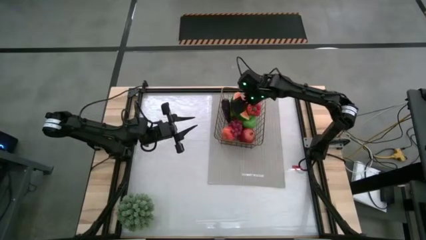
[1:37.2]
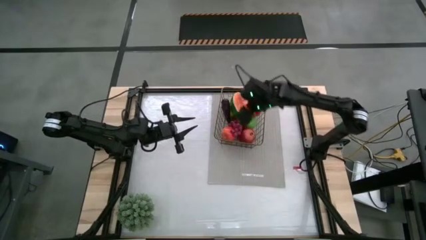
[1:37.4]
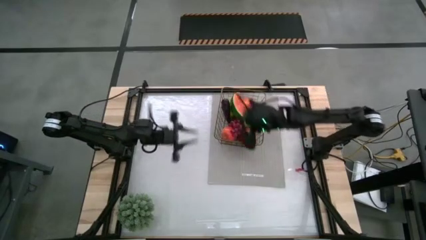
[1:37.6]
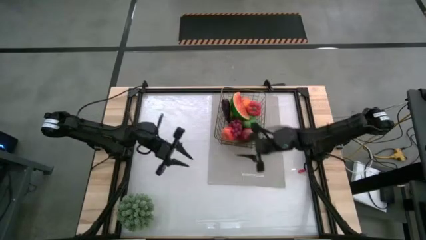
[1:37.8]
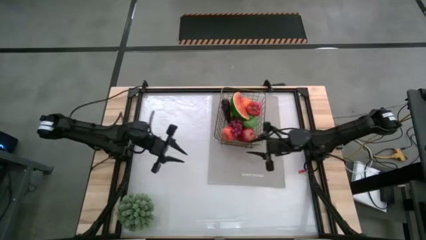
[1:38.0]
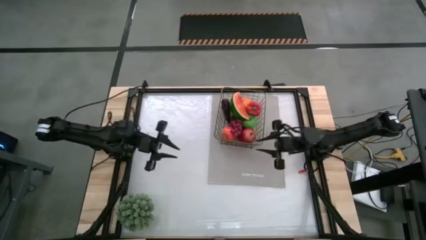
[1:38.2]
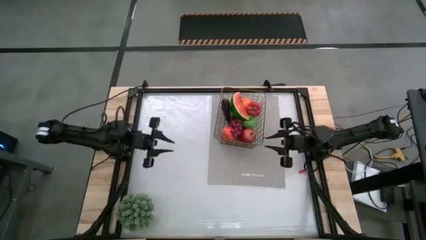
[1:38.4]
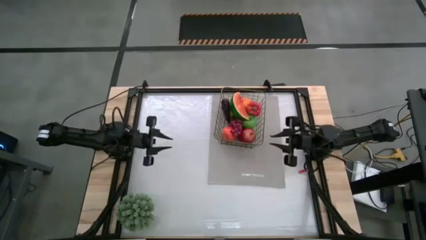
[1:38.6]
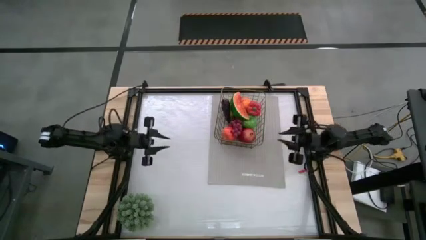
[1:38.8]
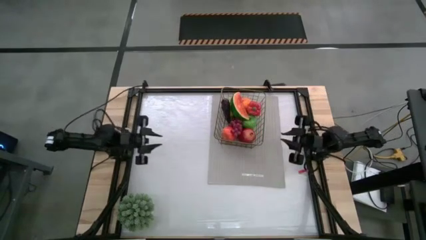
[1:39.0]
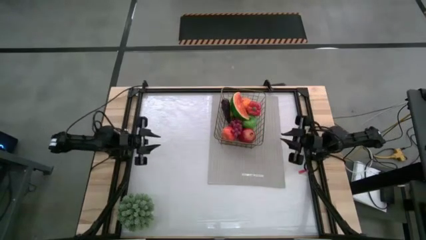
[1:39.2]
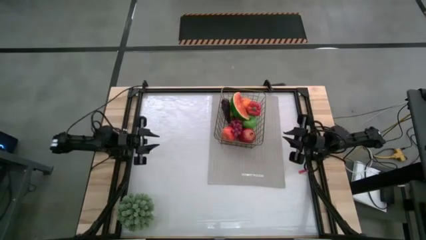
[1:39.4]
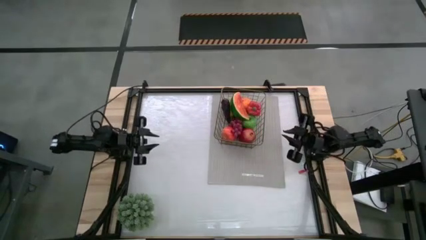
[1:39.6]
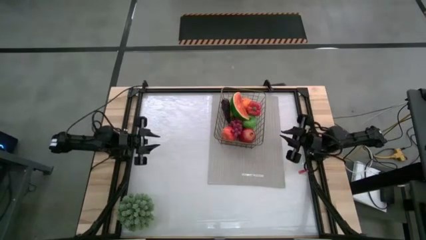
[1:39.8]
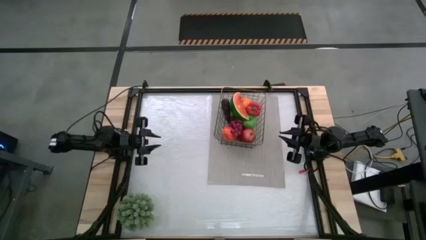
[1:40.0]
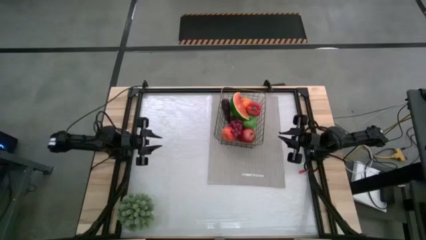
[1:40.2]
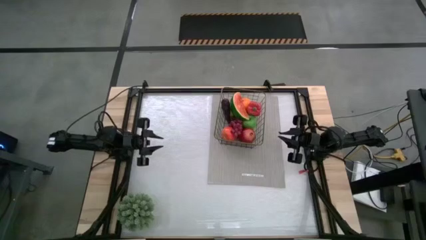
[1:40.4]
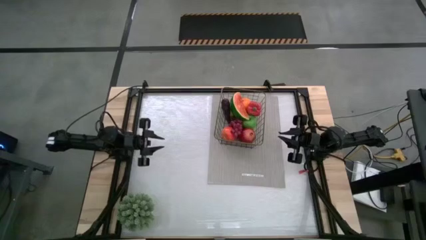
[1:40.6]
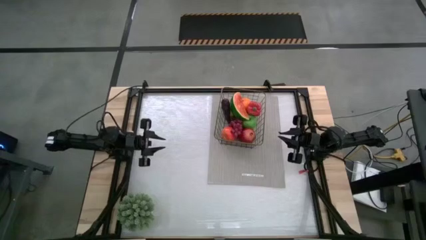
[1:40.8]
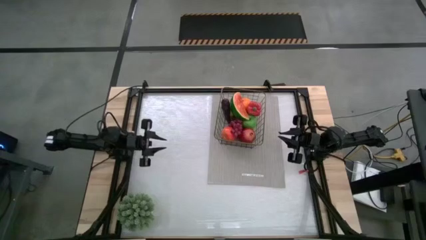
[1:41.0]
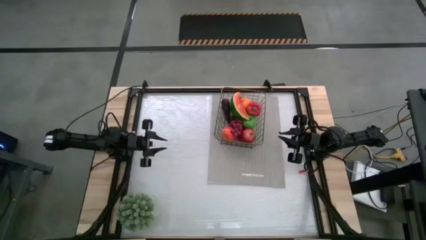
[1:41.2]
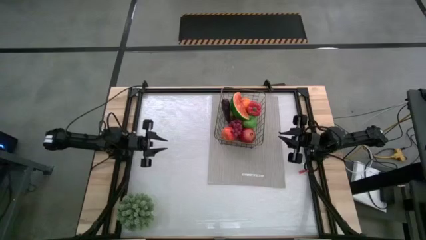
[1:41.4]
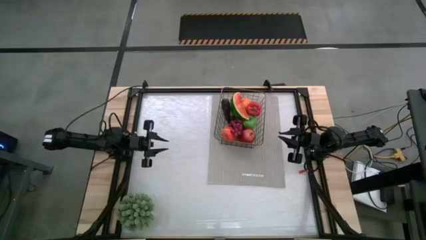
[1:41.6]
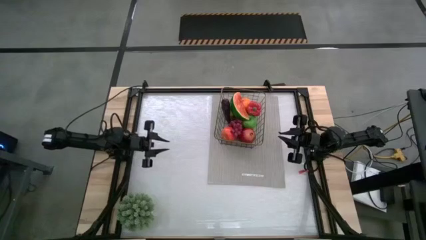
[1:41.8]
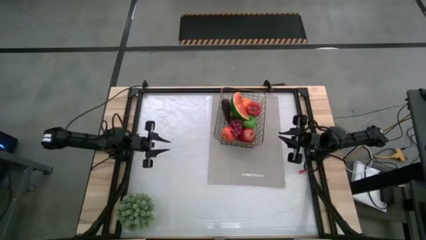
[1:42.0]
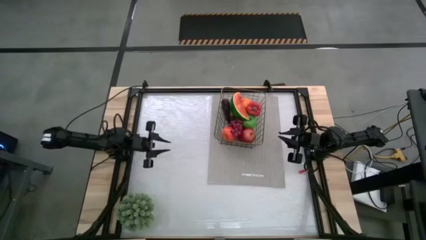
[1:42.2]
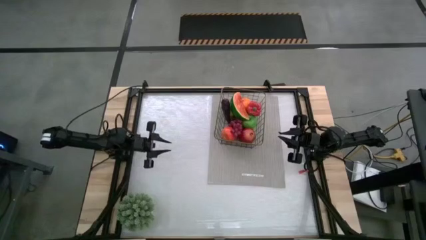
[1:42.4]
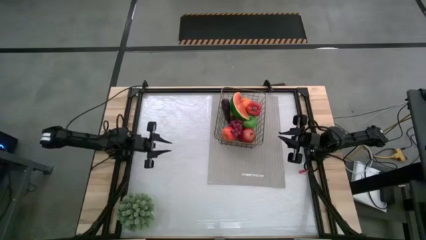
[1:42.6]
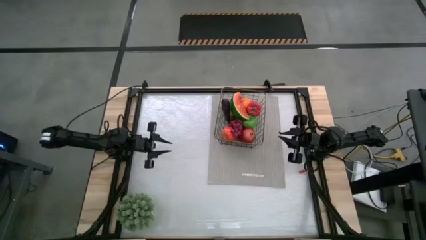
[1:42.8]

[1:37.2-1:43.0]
Task: Build produce basket
Return to Home Position

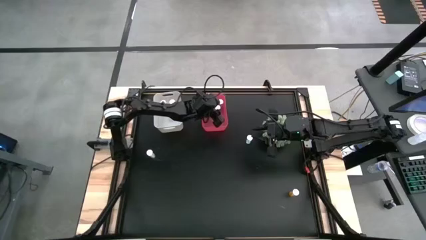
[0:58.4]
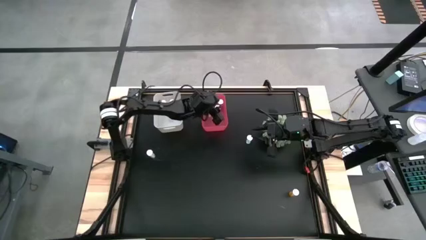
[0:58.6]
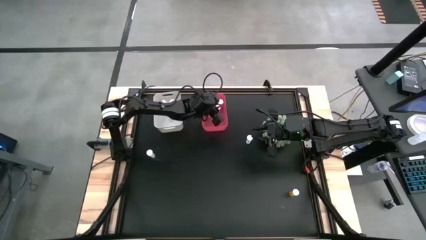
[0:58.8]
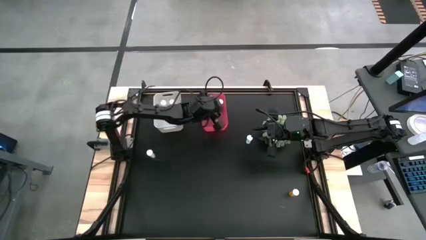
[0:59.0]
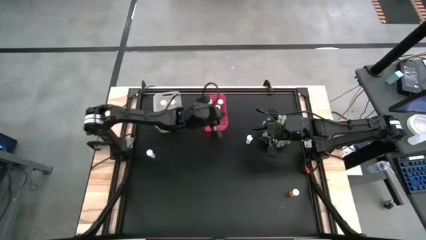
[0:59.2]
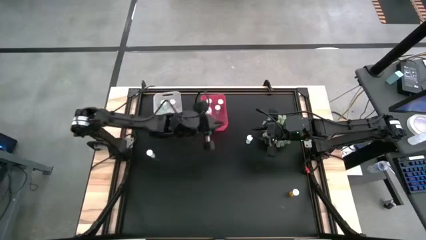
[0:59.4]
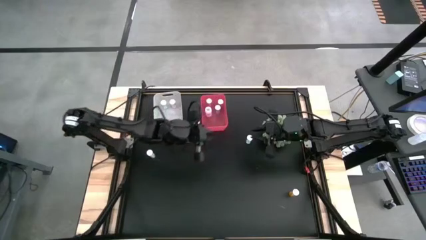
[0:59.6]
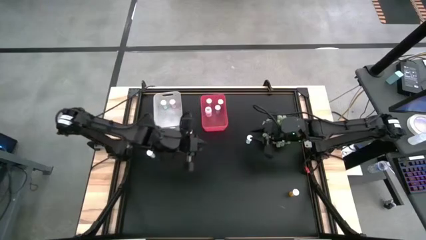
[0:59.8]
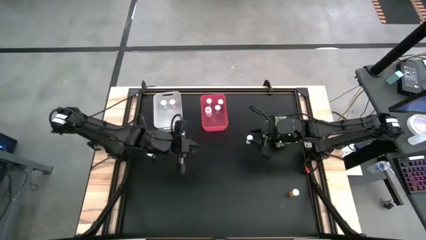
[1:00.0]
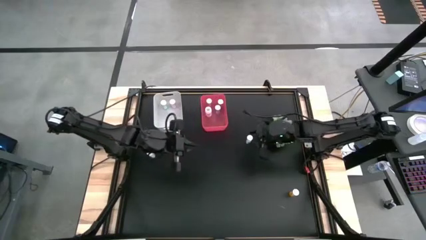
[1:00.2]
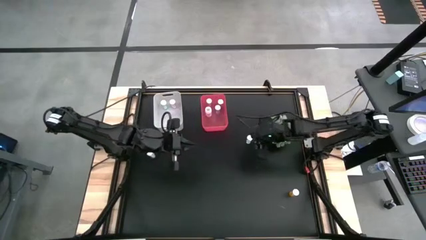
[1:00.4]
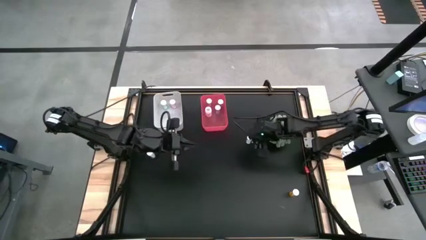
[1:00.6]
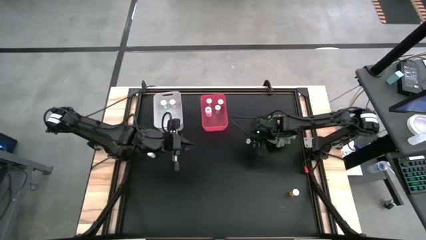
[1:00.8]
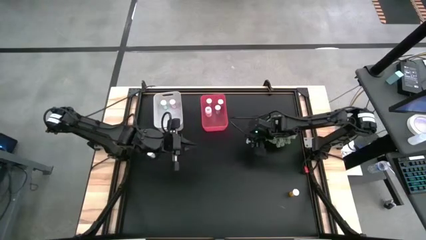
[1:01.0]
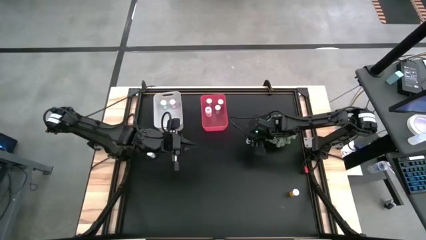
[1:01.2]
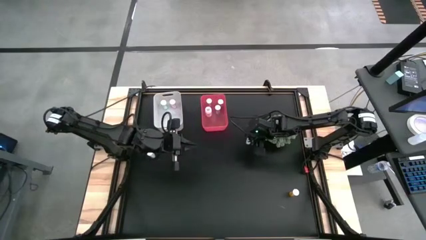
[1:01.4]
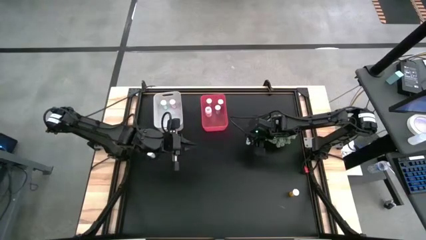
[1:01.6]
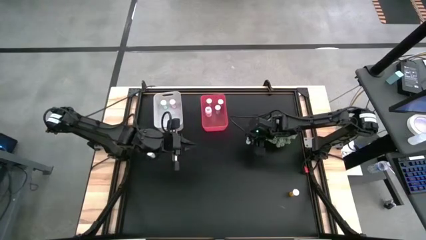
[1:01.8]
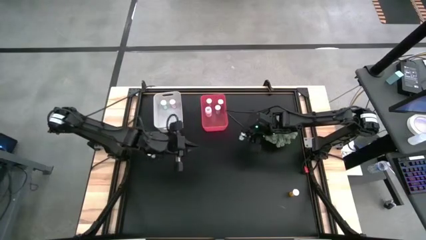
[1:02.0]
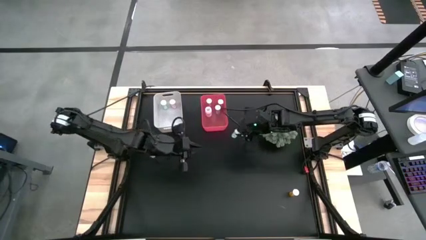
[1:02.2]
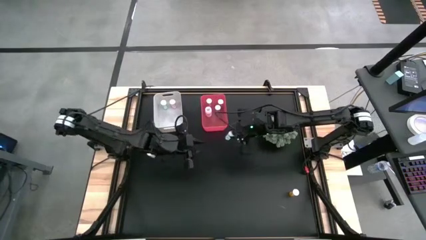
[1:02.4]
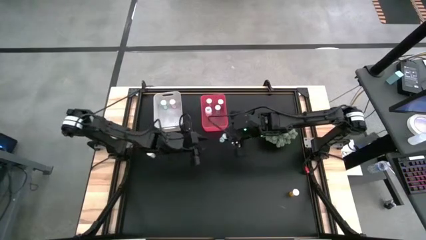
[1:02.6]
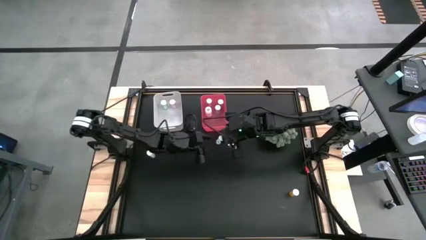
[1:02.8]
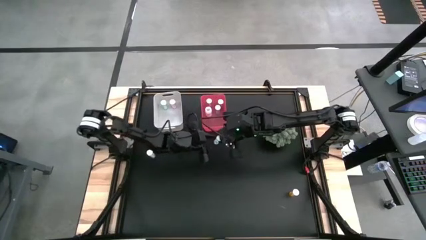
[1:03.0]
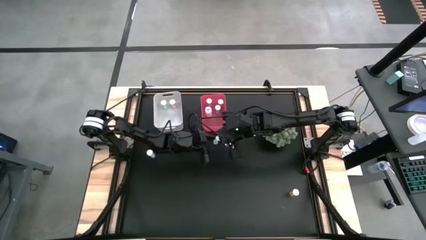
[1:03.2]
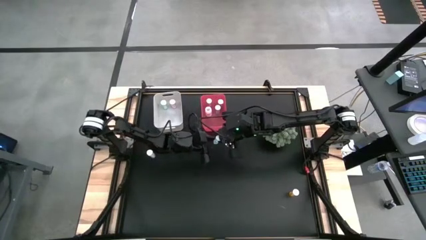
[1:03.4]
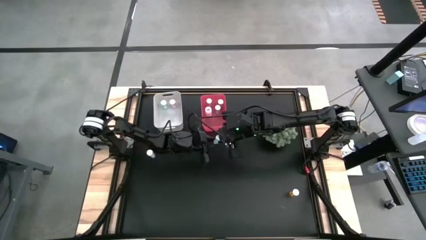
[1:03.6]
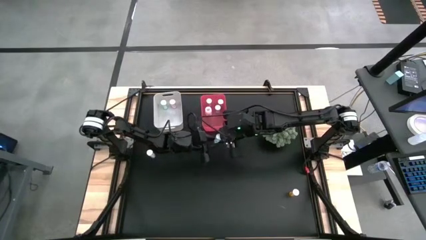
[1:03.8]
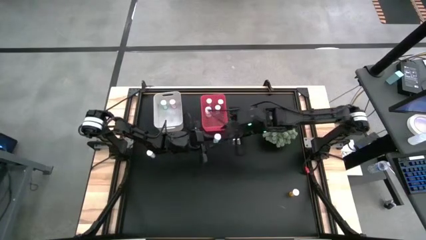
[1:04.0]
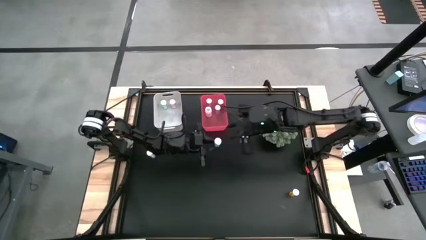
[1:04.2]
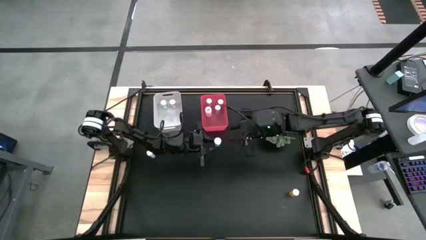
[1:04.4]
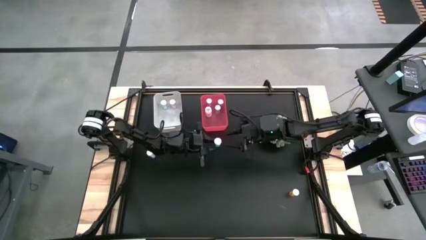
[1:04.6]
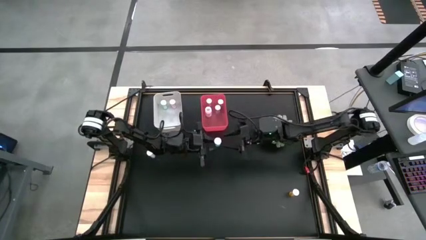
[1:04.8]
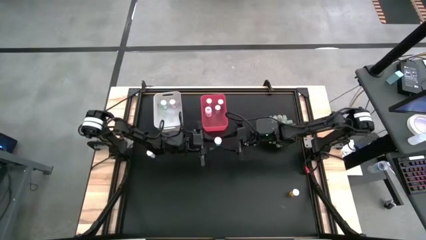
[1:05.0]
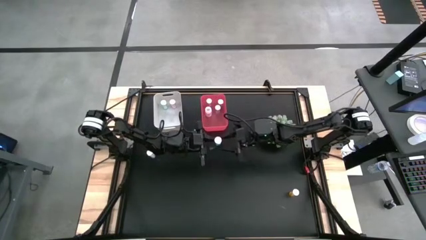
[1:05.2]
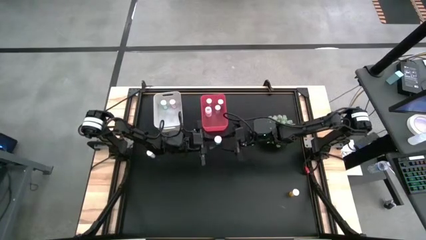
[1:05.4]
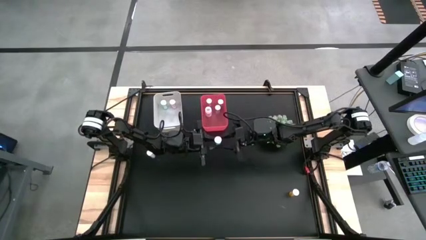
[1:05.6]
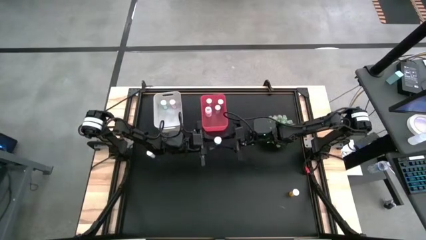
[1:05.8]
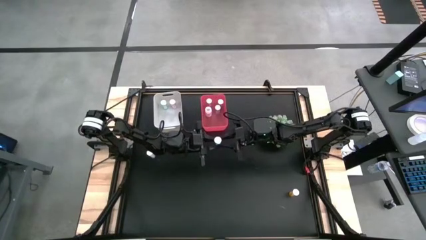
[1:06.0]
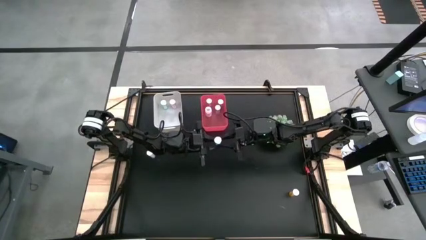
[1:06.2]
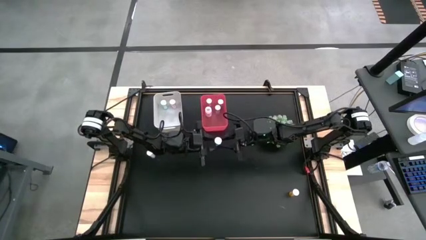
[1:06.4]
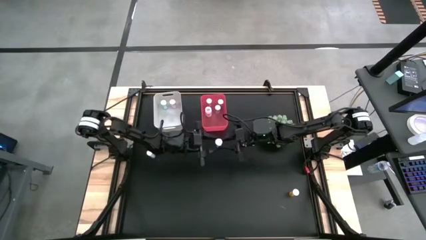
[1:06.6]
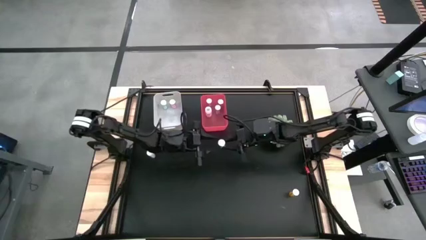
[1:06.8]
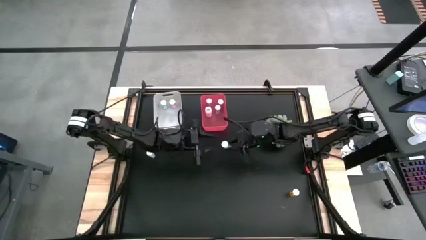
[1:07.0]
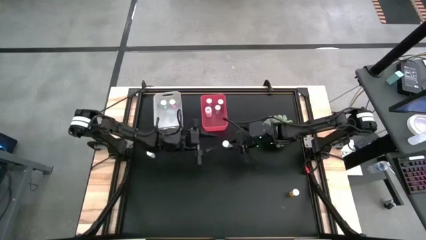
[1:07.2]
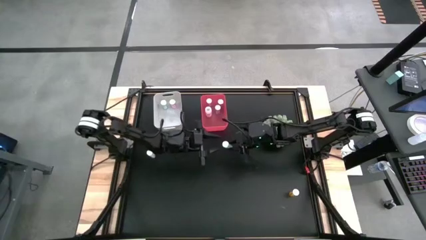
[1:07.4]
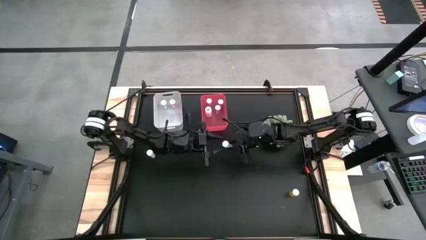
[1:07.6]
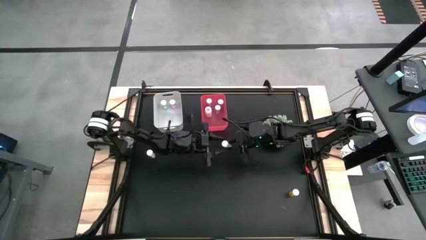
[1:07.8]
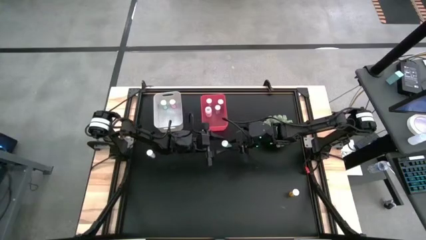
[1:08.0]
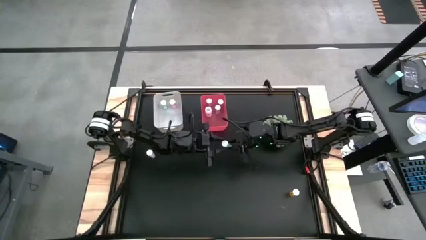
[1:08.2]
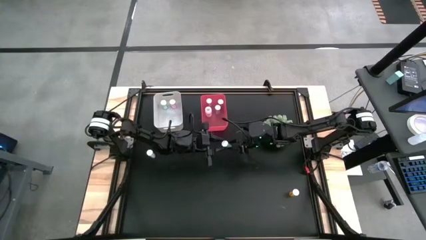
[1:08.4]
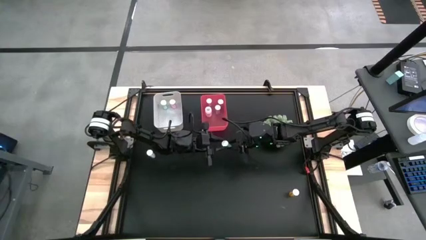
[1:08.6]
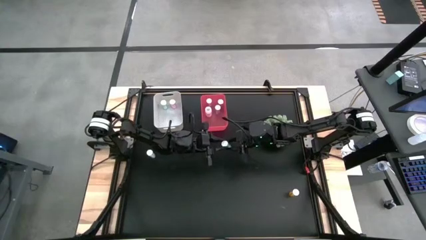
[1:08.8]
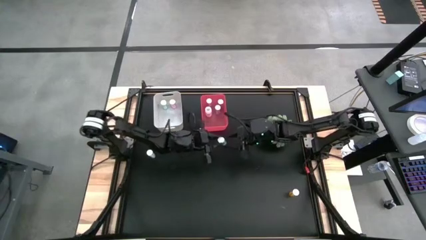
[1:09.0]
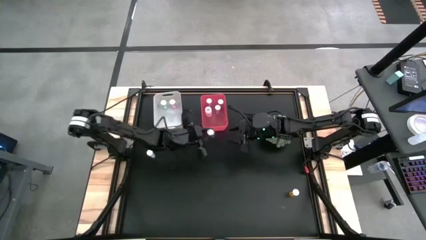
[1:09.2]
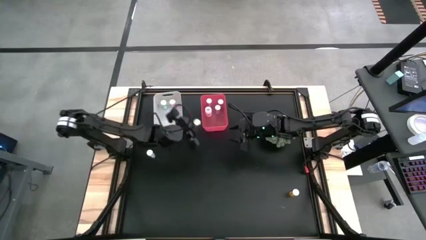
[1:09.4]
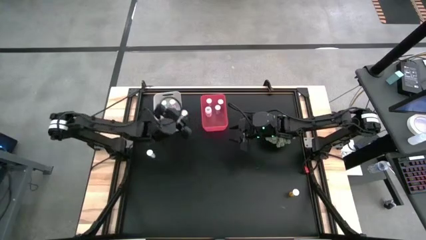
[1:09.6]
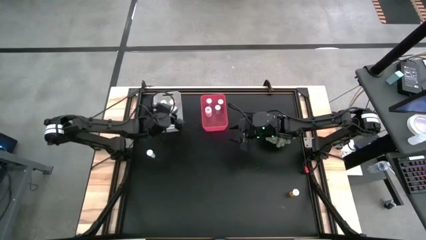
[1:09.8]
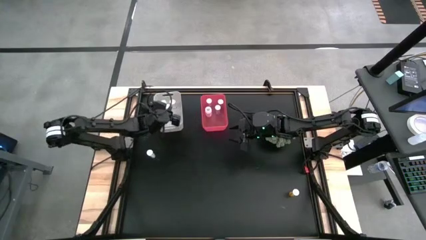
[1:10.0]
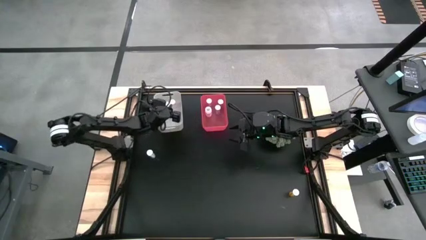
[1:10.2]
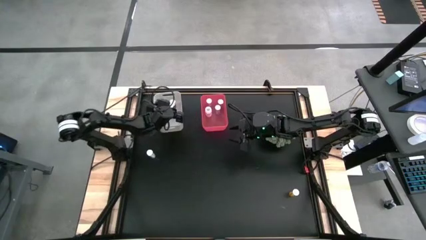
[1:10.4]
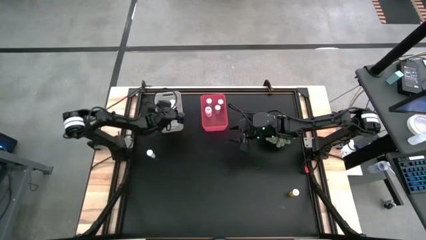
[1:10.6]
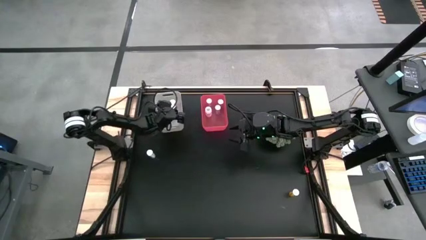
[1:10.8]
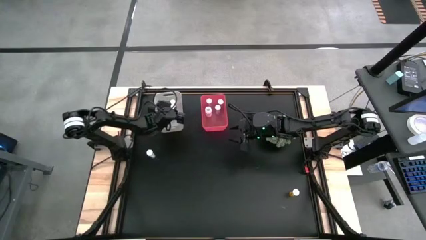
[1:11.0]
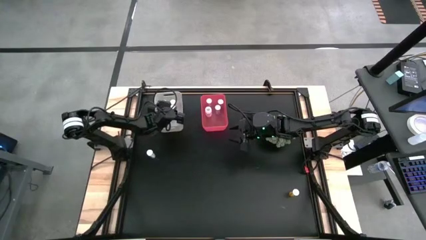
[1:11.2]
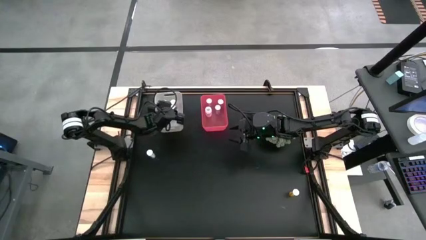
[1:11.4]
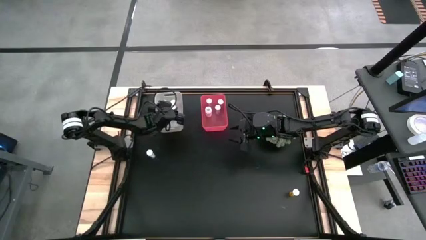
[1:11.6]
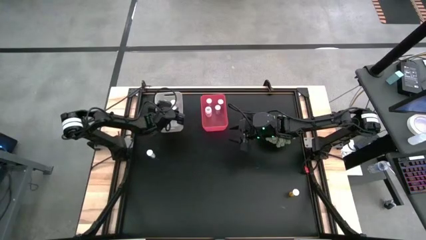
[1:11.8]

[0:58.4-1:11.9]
Task: Pick and place medicine bottles into bin by pill shape (circle, oval)
Put the blue tablet bottle into the white bin
